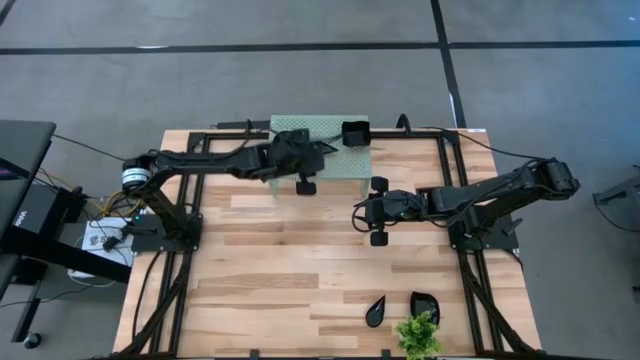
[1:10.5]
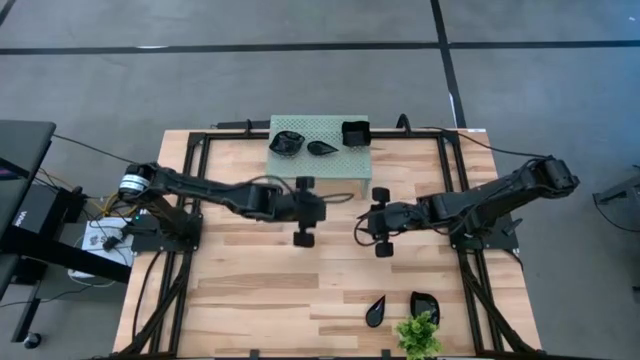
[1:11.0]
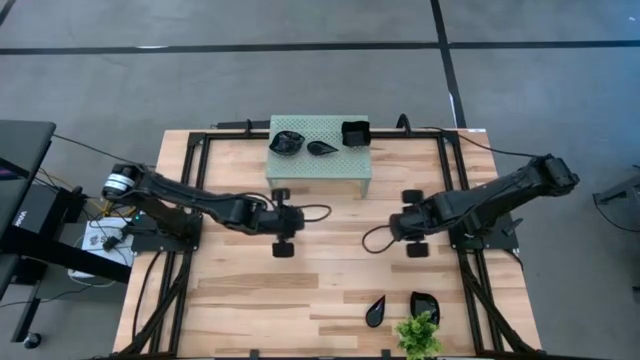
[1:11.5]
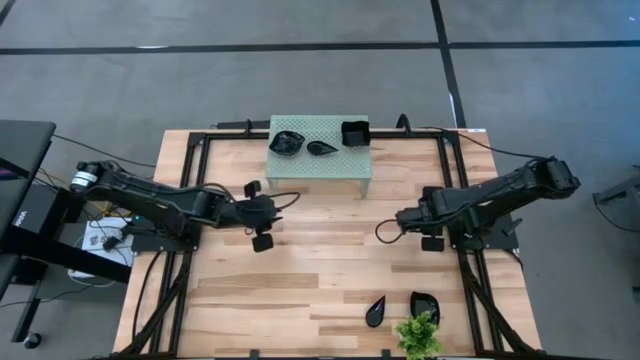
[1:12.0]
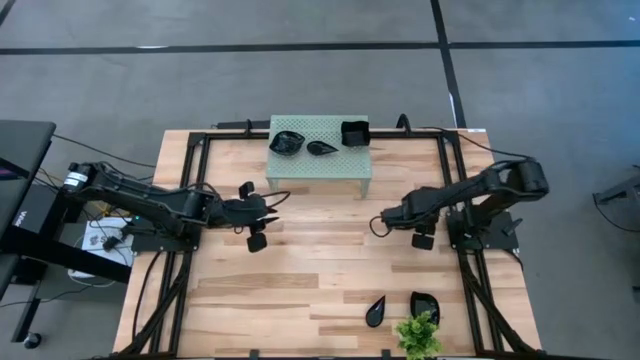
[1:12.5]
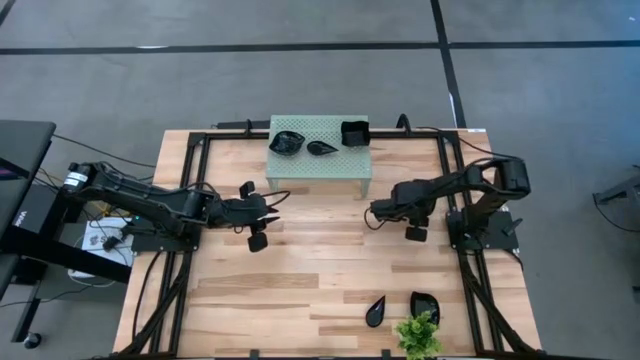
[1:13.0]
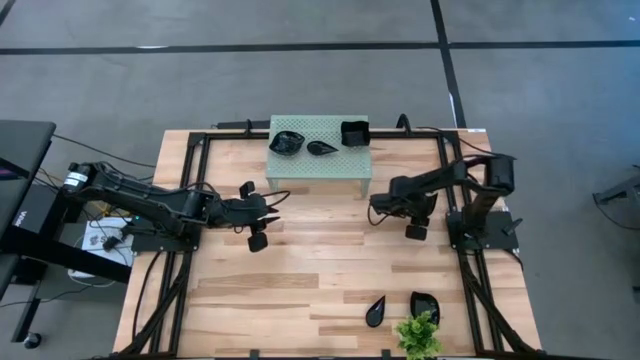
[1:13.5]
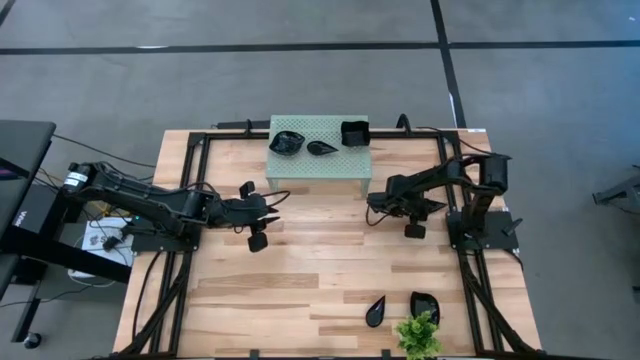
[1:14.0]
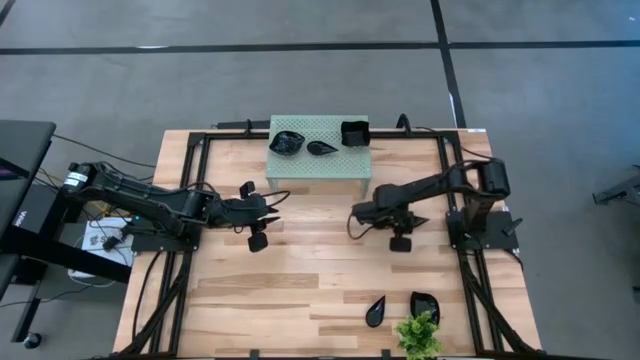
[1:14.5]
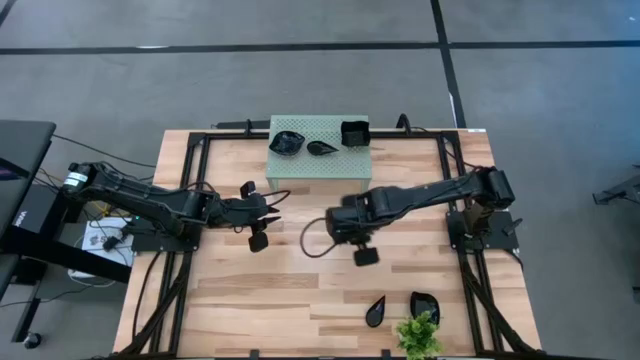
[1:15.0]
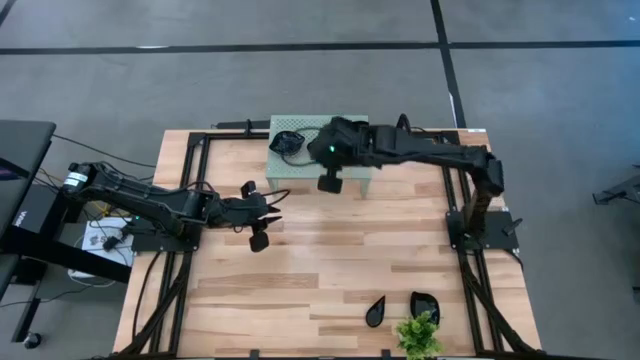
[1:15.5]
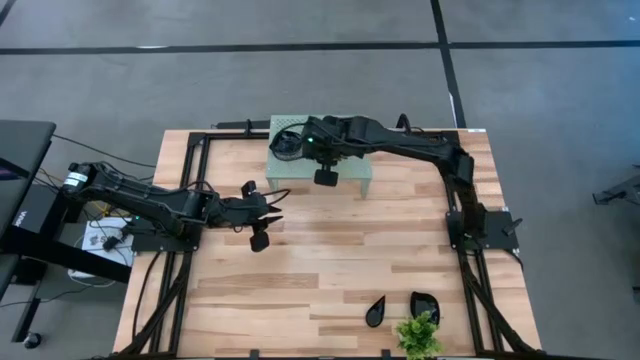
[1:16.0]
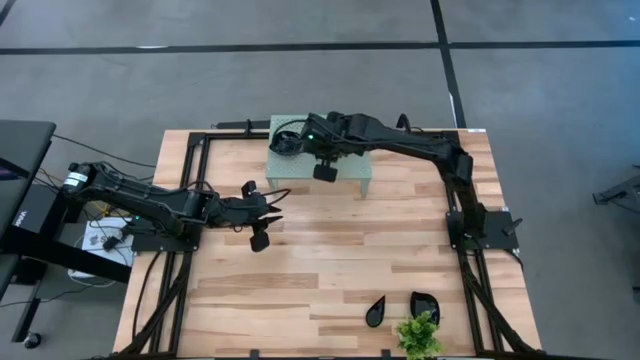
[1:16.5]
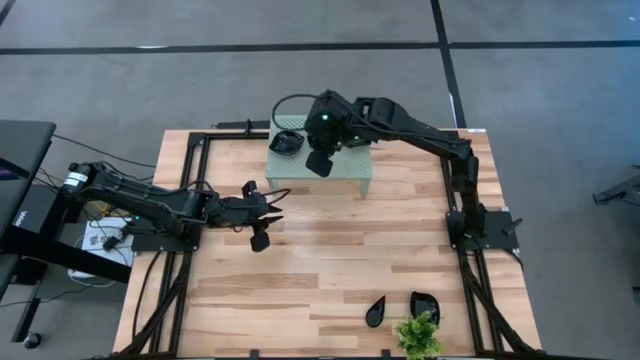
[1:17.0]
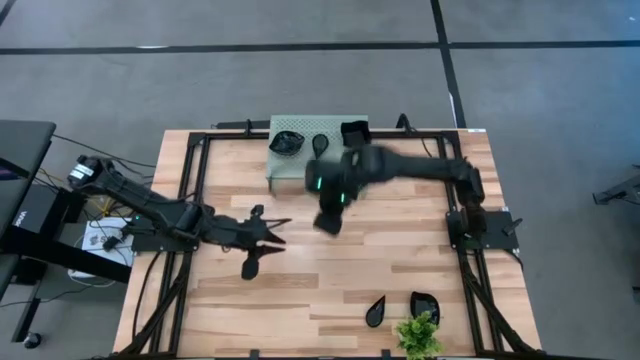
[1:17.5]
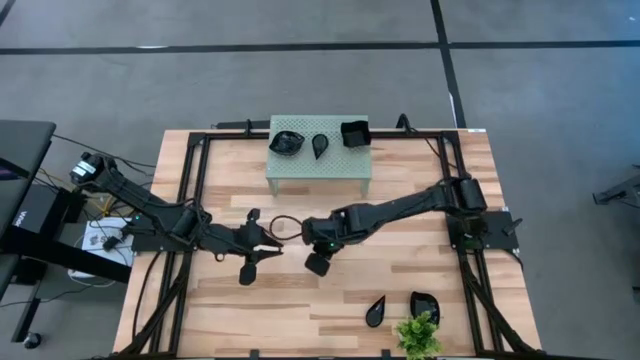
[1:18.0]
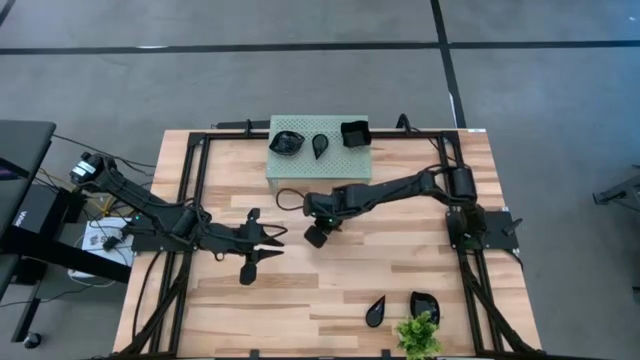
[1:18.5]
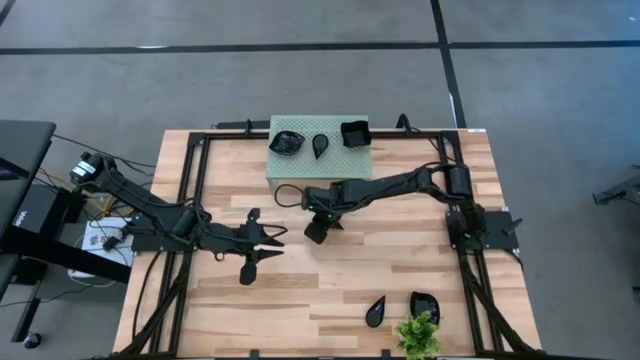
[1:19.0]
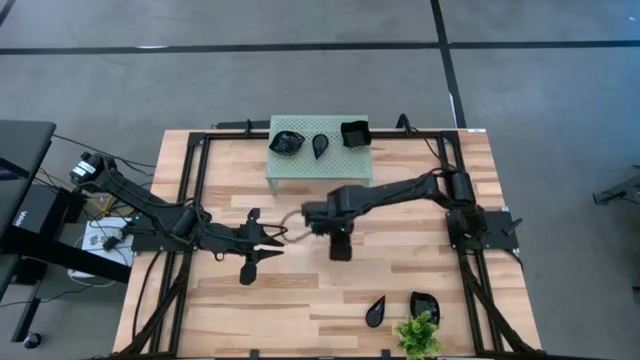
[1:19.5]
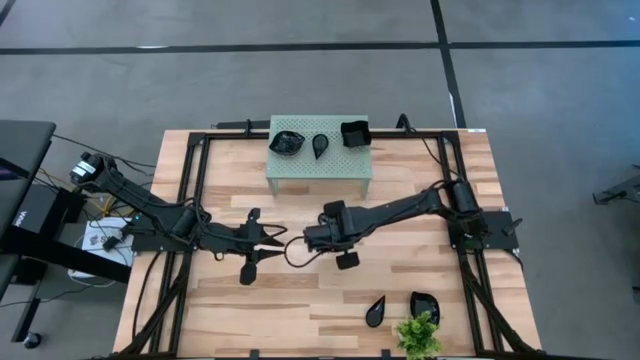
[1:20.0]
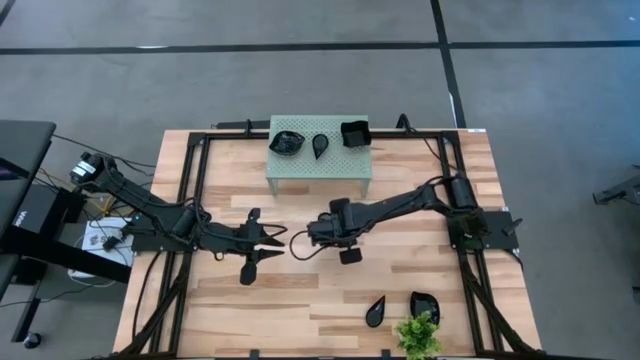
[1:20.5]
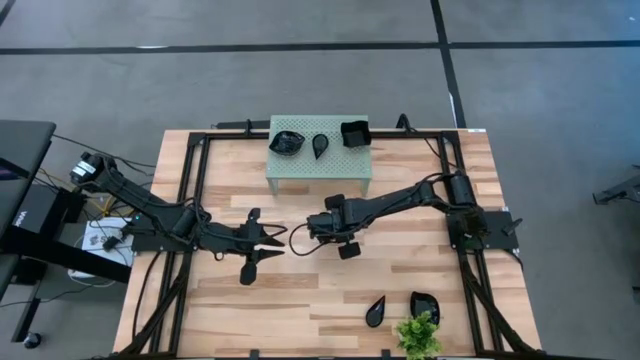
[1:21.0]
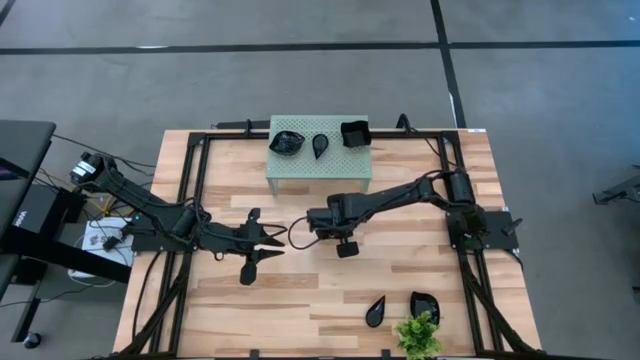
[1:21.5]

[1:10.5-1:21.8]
Task: Pick & Place Mini shaped plates
Stack the drop-shaped plate on top of the other drop-shaped plates on the shelf

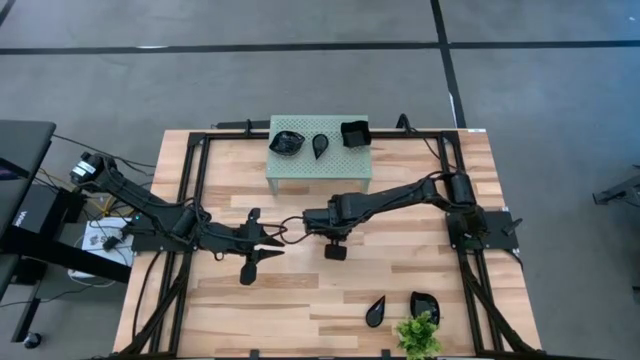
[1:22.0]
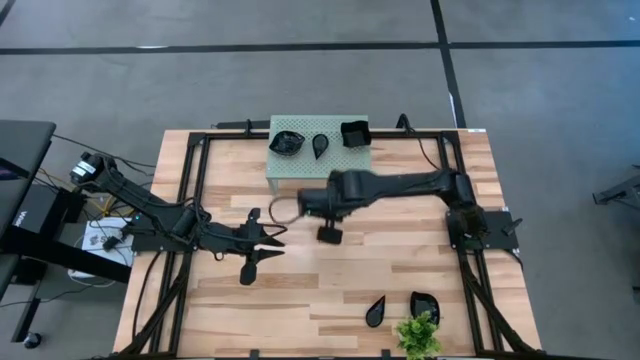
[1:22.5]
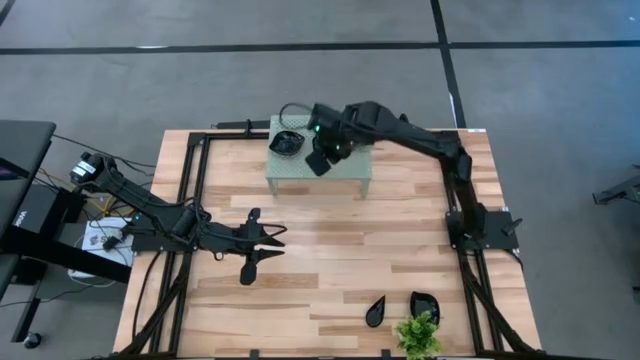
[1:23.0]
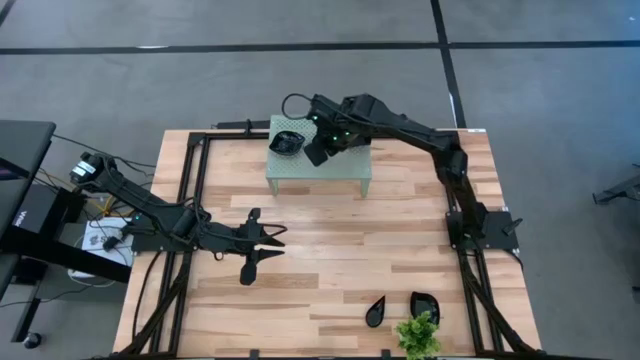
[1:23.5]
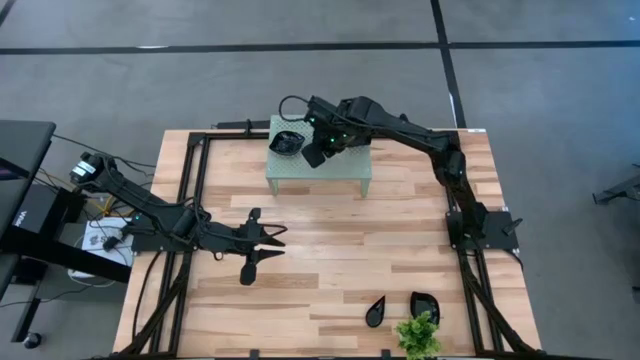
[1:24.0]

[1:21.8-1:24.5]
Stack the drop-shaped plate on top of the other drop-shaped plates on the shelf

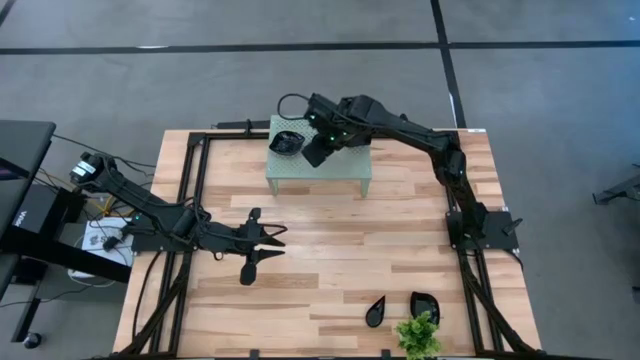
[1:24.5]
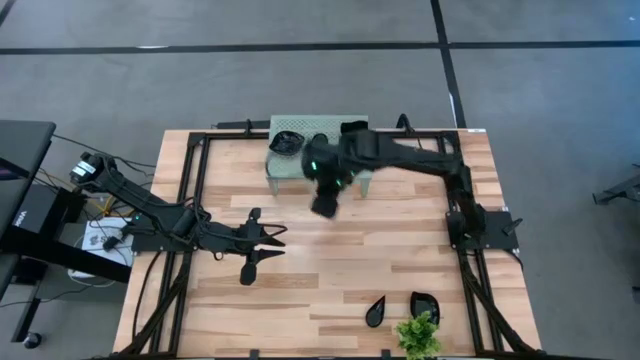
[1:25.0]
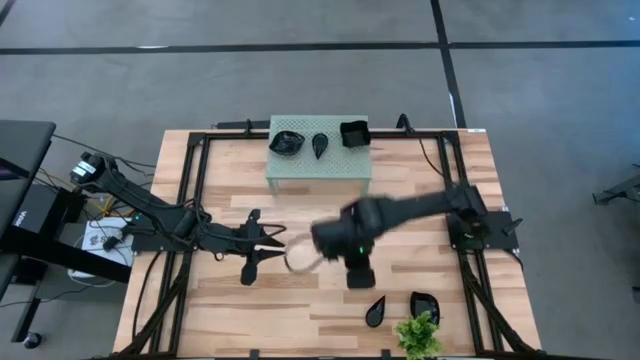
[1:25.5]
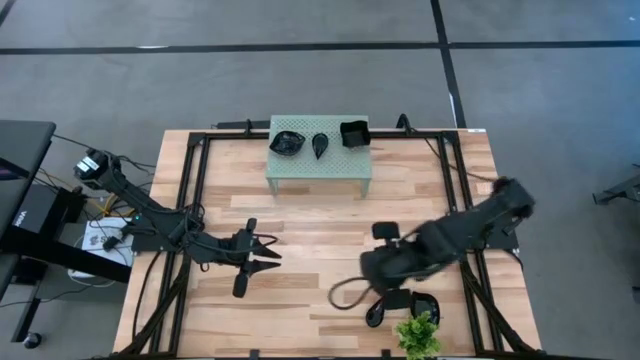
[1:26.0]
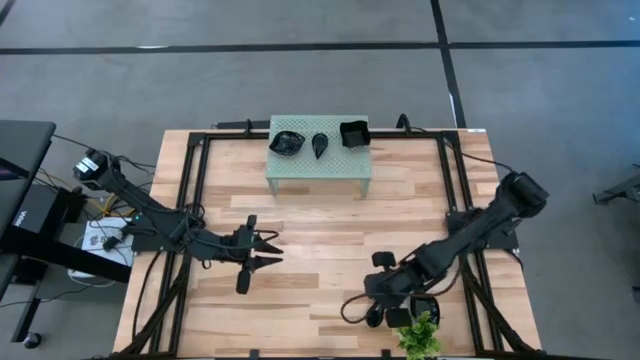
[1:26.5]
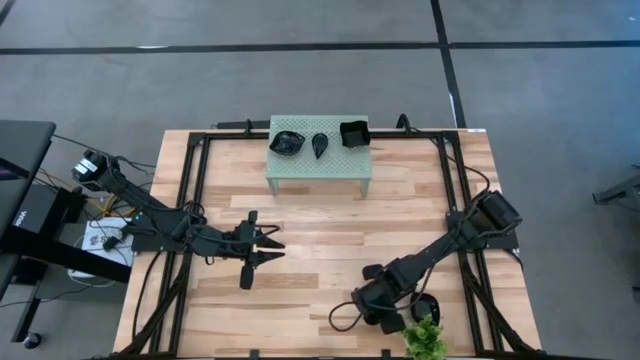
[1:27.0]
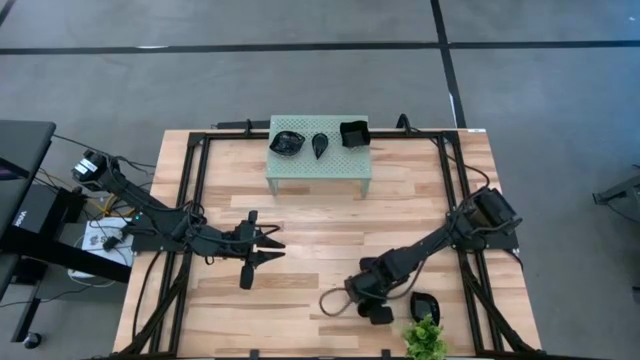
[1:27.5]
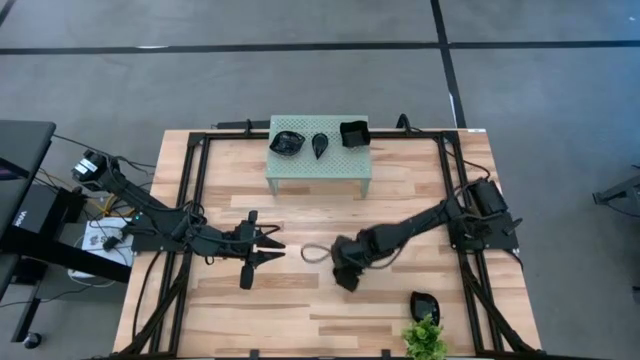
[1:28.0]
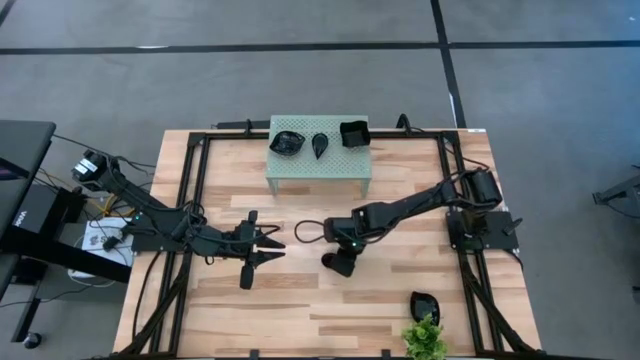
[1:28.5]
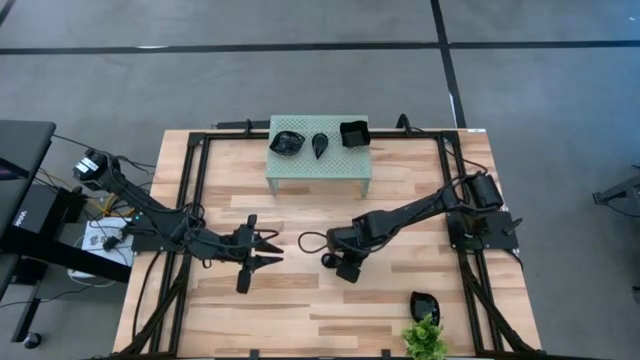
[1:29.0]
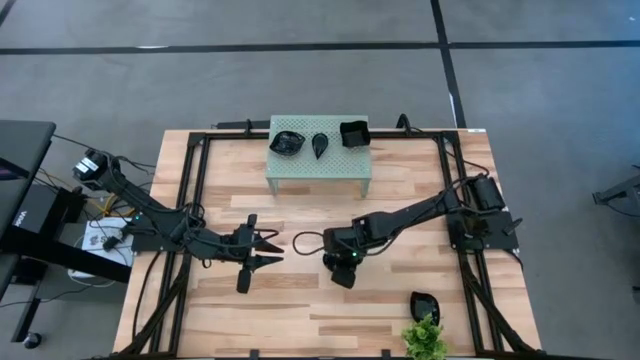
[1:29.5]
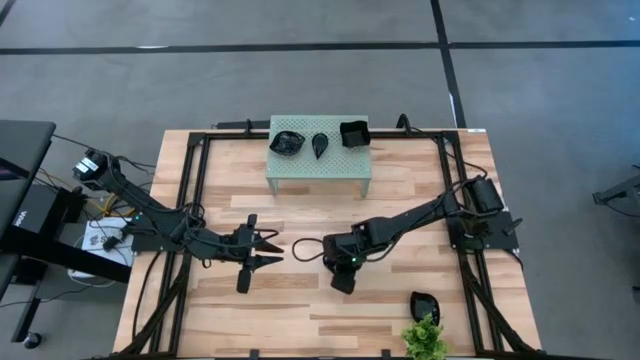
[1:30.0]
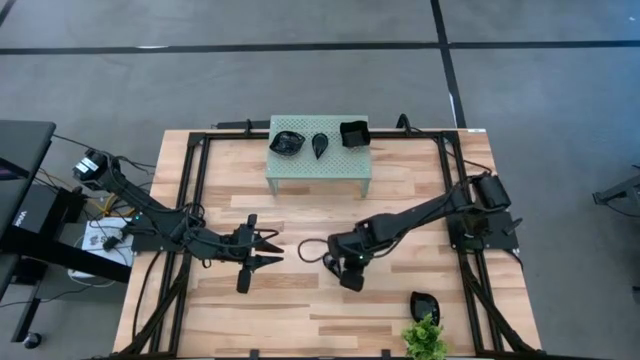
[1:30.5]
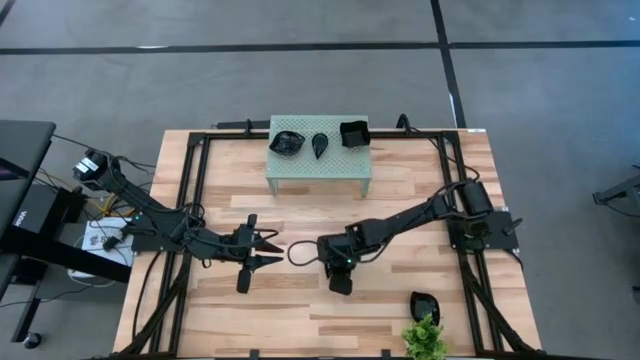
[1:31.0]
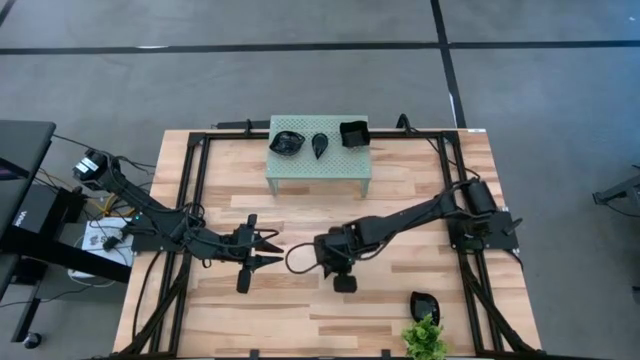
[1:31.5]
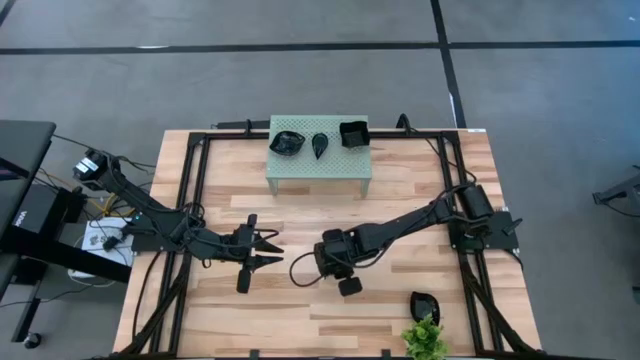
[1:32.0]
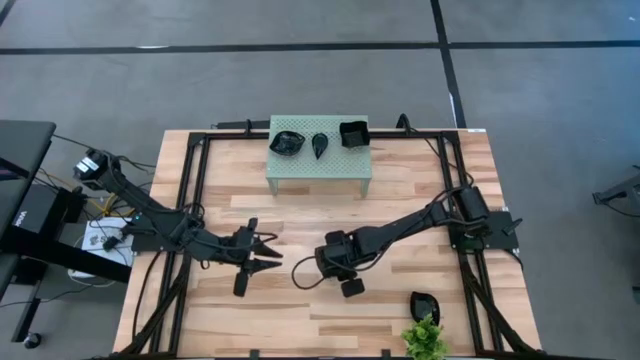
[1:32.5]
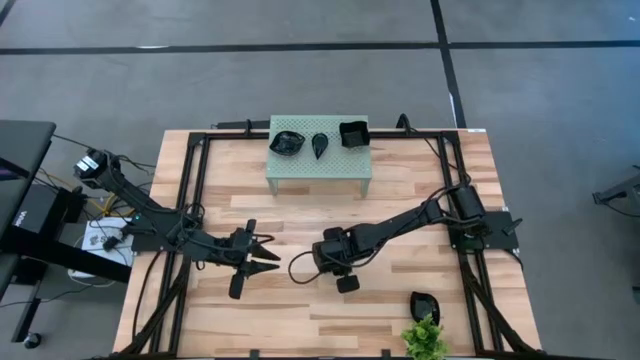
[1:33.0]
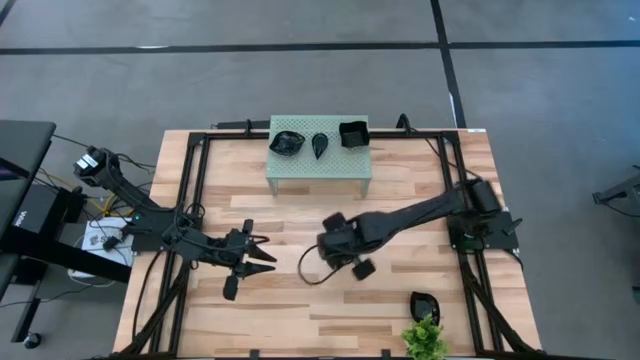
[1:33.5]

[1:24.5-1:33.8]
Stack the bottom center-shaped plate on top of the other drop-shaped plate
